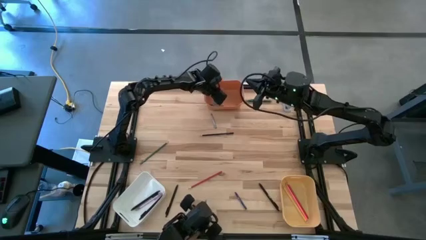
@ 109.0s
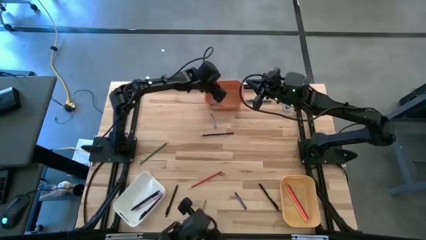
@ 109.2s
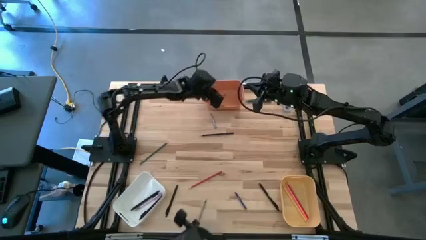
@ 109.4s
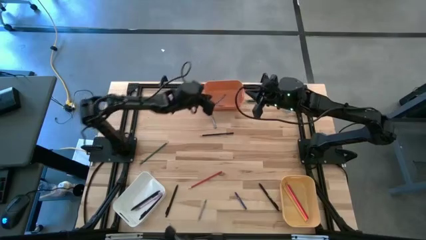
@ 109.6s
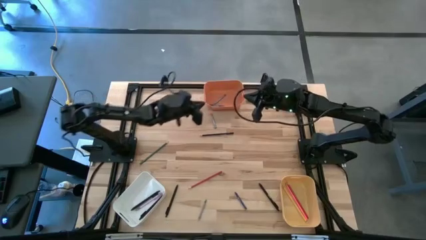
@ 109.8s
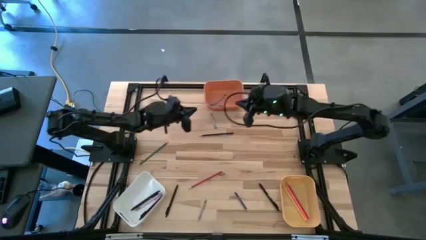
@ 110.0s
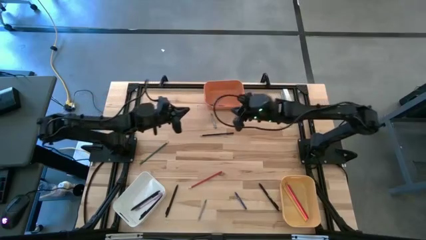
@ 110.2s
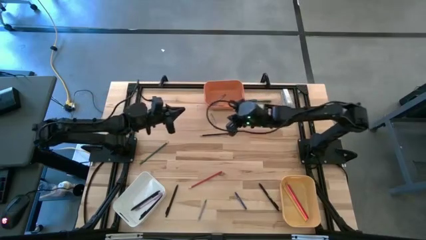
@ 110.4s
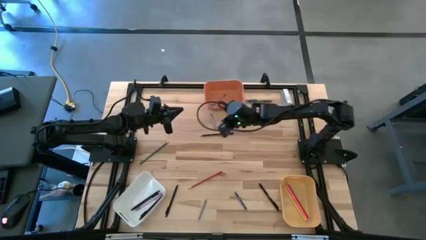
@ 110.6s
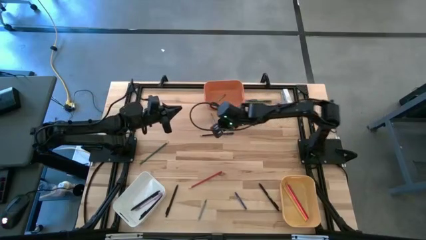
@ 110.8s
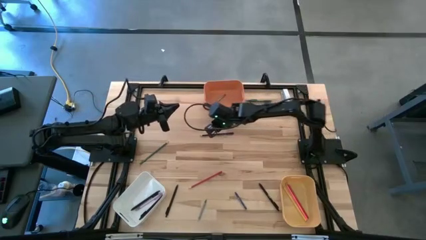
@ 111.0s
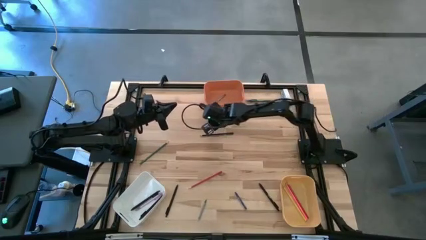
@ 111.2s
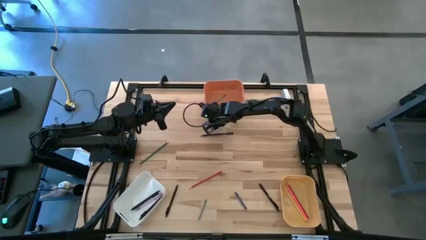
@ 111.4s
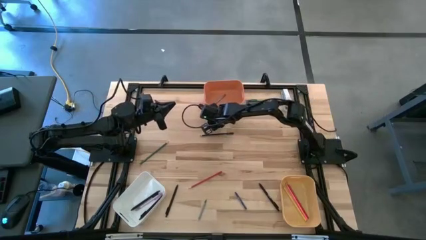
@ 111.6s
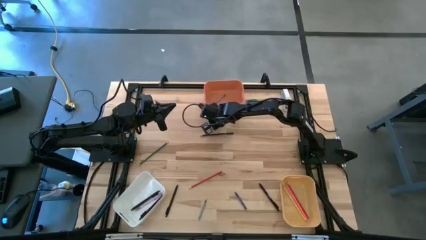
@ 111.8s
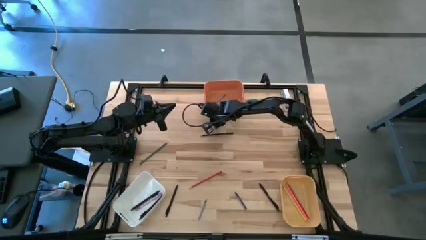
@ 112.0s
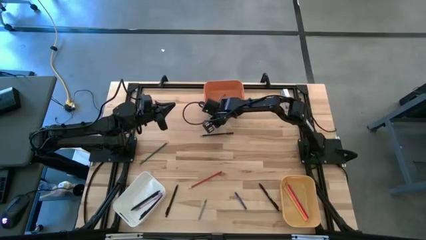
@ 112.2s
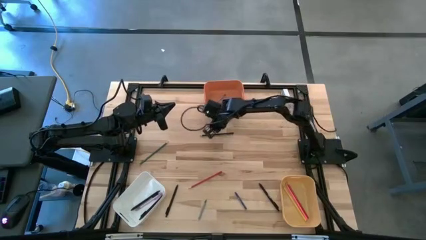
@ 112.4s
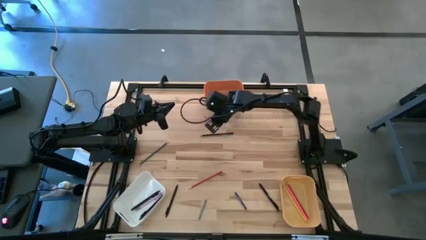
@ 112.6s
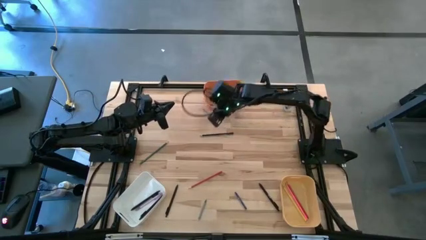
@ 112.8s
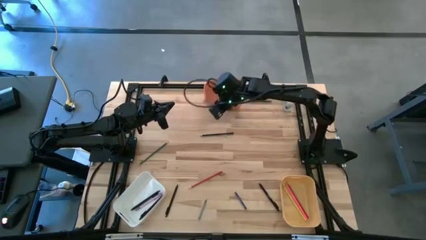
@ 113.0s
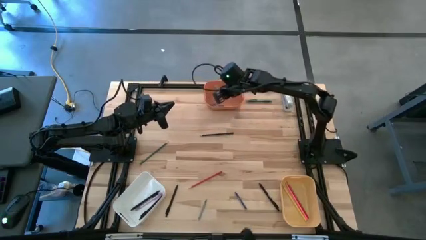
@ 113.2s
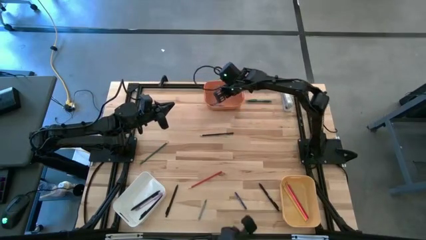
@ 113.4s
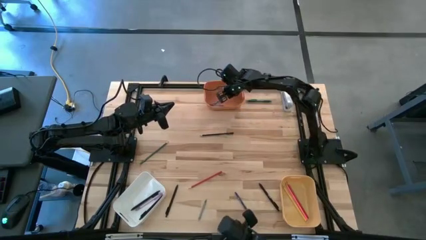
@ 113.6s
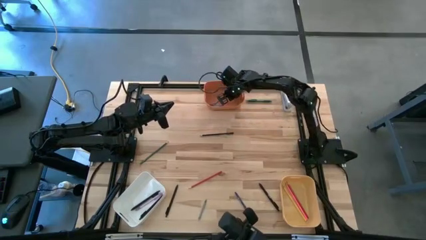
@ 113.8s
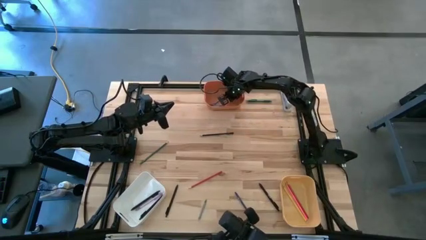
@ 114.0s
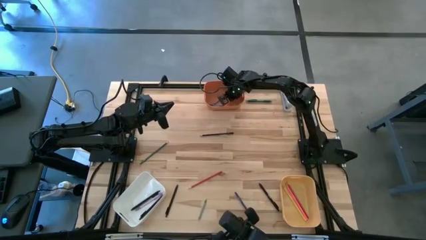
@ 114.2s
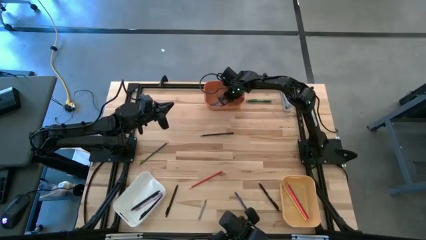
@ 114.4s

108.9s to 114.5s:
Task: Sort crayons/erasers/pens/pencils in bins
Put the gray crayon into the orange bin

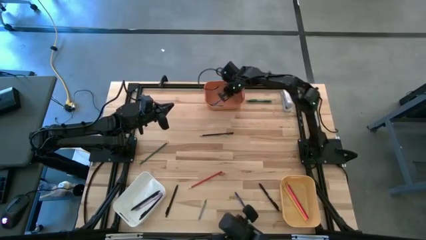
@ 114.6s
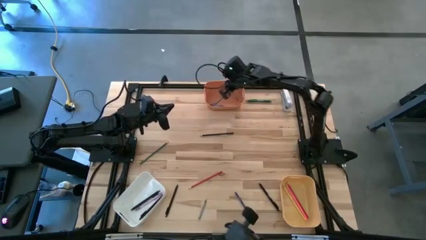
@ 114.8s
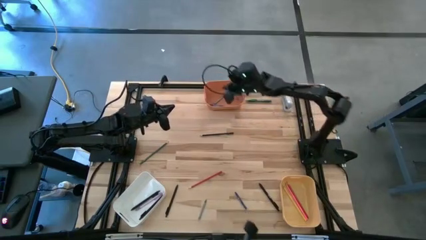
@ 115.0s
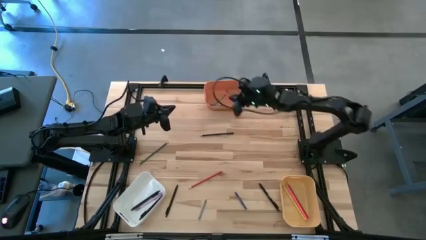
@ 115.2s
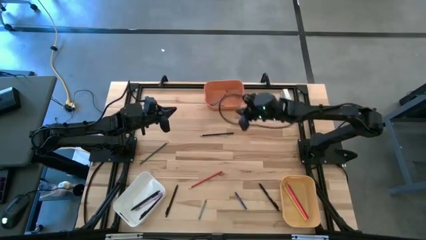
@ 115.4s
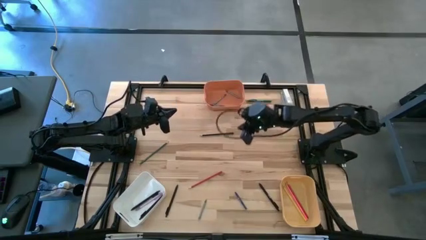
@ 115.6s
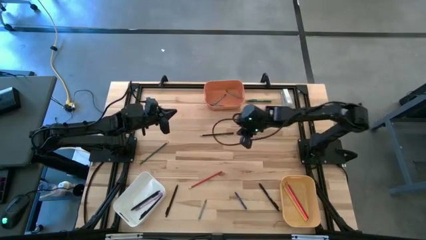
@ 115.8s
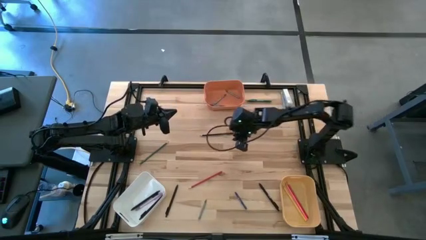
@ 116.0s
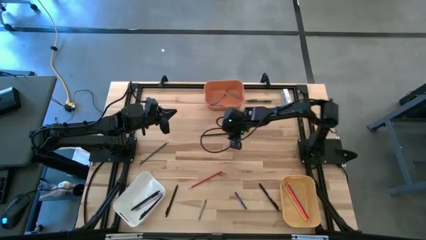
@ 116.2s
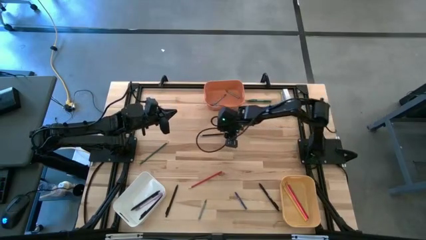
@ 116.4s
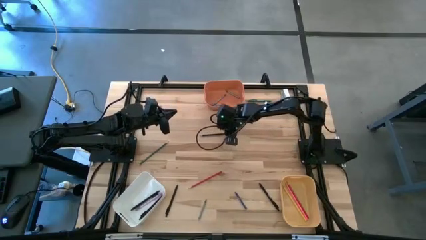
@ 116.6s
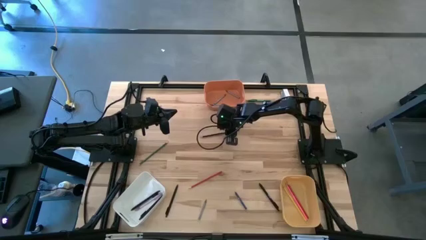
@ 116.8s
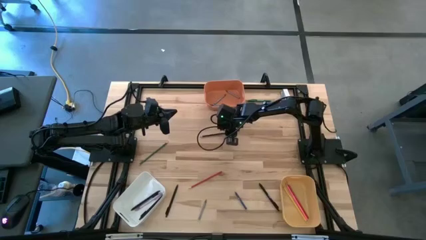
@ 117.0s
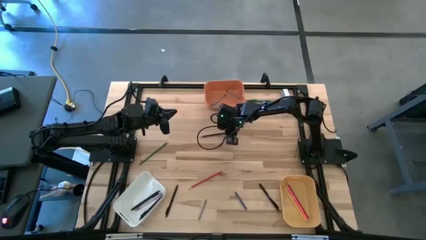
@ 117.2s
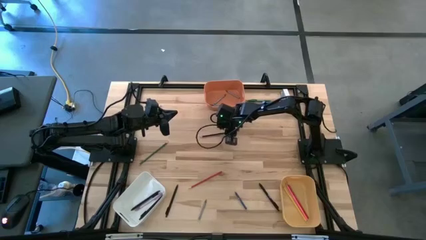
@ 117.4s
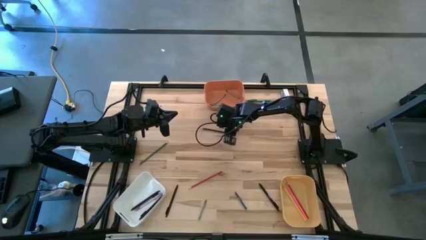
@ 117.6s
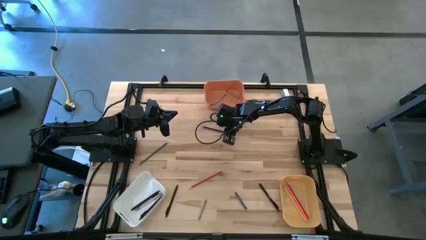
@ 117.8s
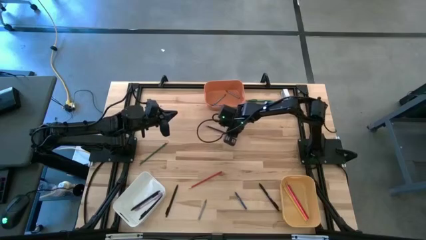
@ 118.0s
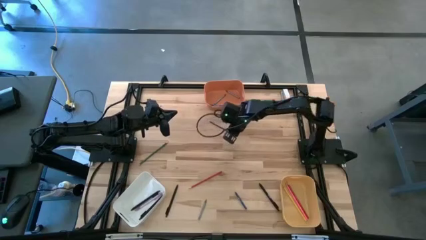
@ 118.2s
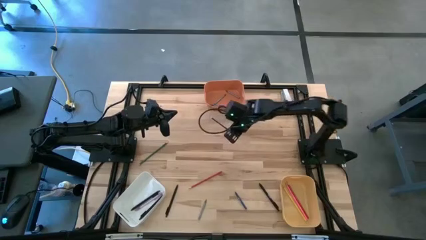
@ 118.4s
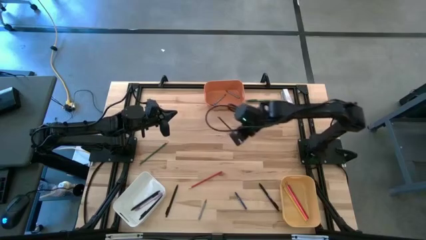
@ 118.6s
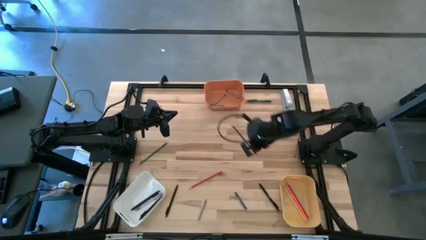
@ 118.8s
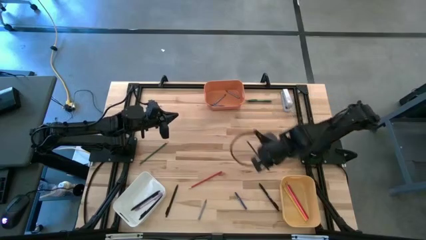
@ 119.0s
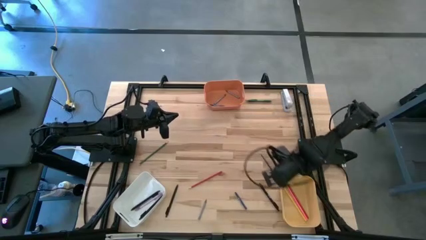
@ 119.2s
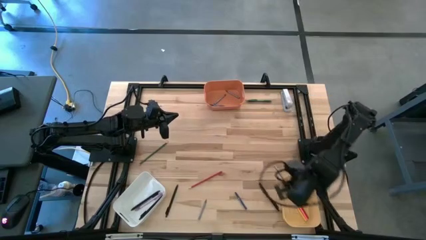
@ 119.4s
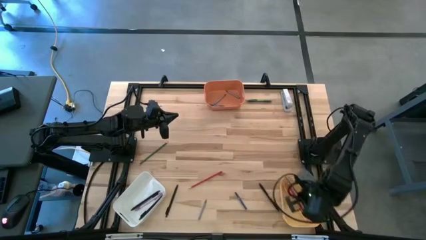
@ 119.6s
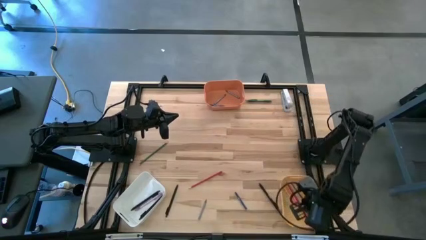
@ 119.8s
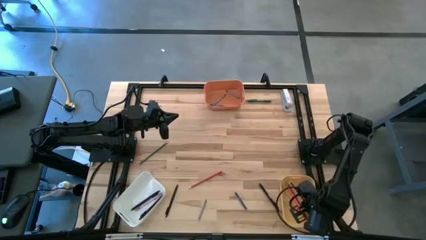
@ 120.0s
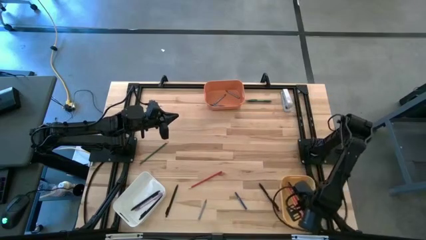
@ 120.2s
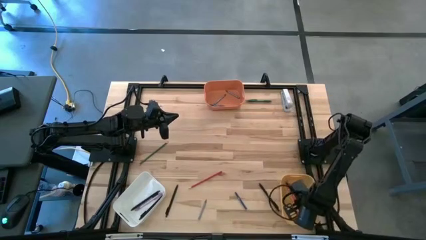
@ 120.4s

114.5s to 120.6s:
Put the blue pencil into the yellow bin
